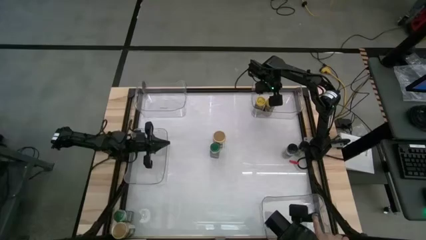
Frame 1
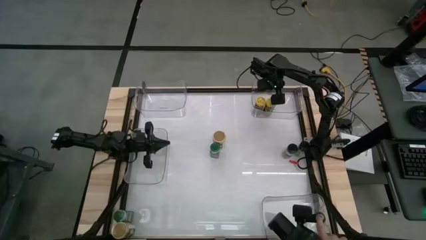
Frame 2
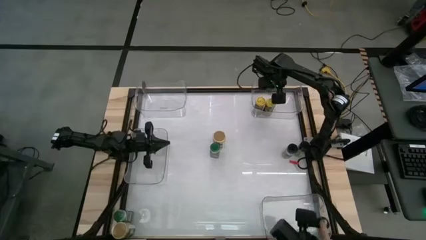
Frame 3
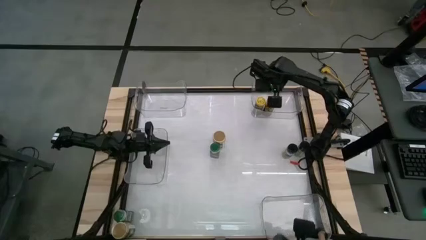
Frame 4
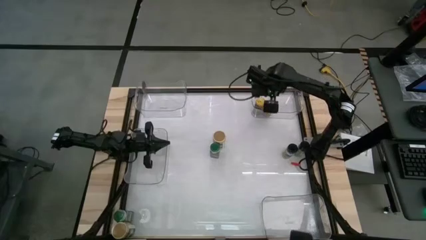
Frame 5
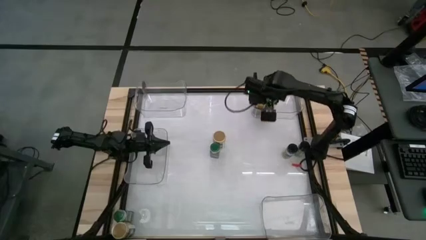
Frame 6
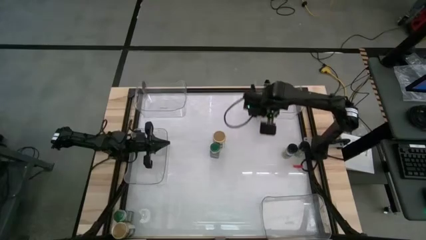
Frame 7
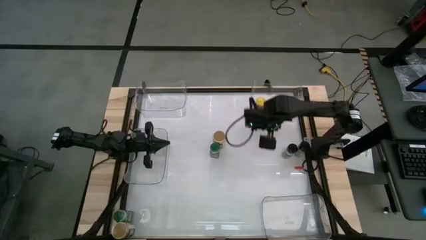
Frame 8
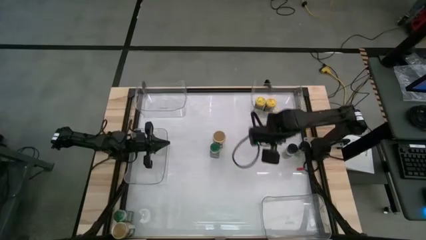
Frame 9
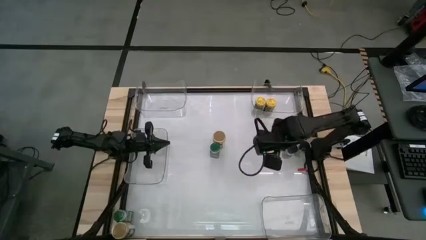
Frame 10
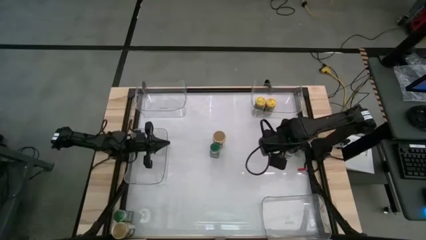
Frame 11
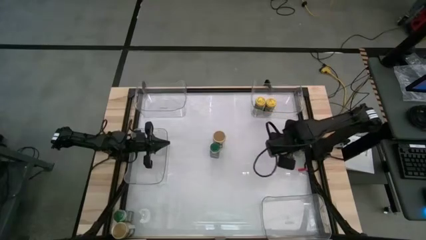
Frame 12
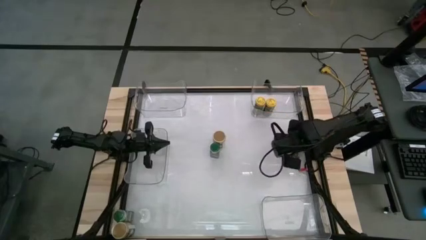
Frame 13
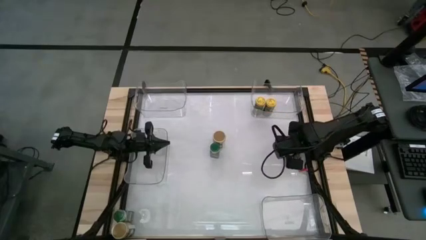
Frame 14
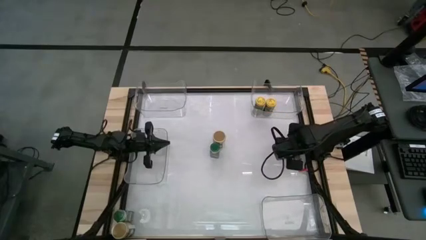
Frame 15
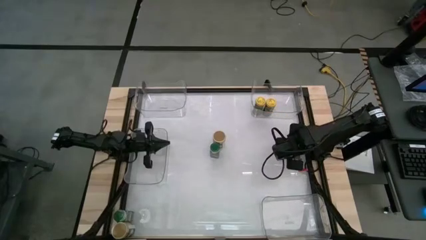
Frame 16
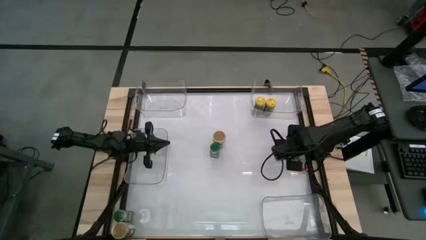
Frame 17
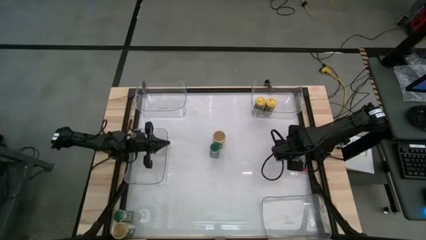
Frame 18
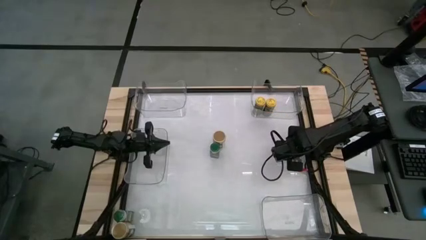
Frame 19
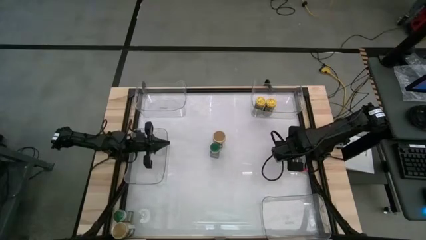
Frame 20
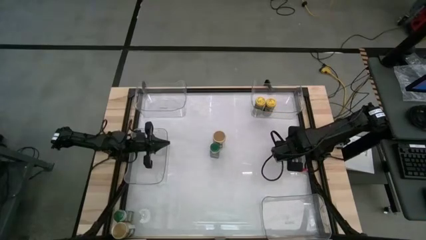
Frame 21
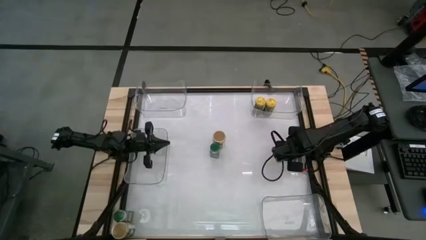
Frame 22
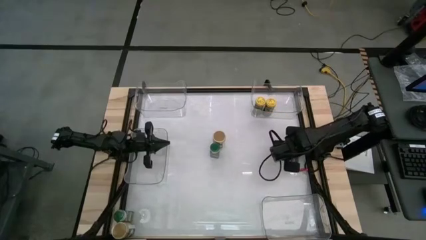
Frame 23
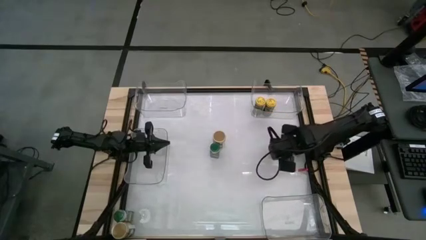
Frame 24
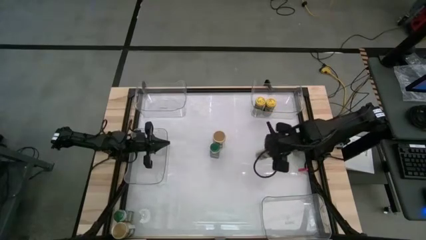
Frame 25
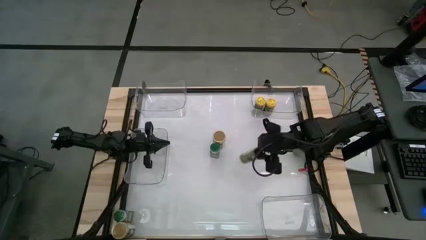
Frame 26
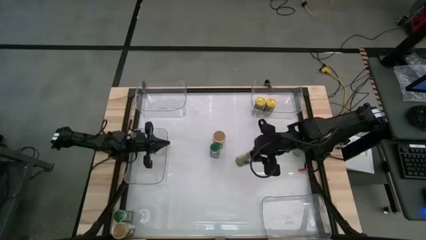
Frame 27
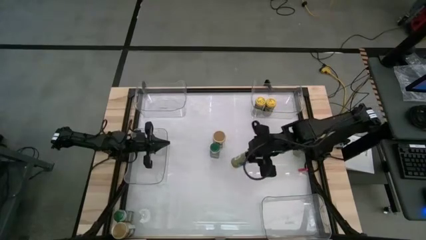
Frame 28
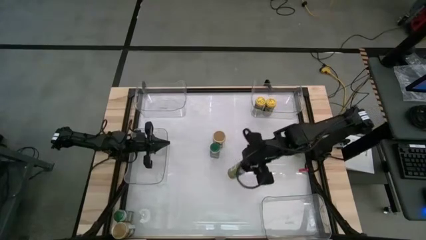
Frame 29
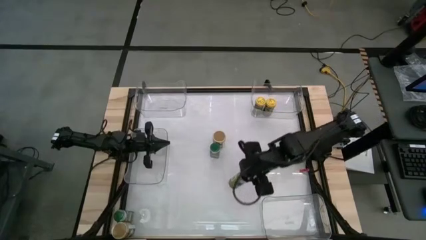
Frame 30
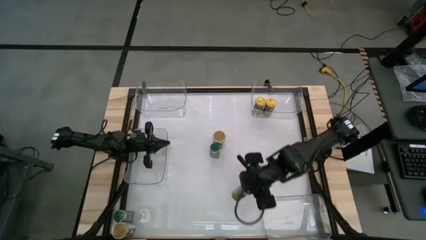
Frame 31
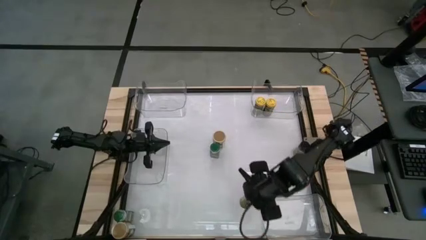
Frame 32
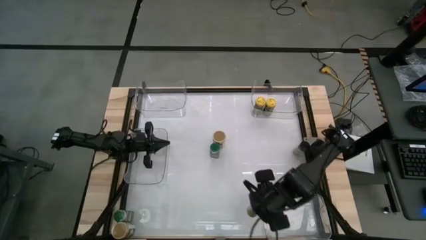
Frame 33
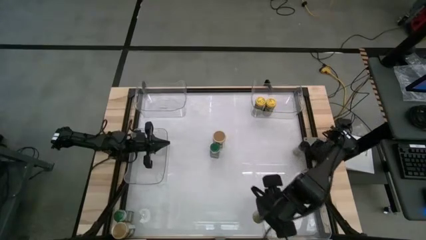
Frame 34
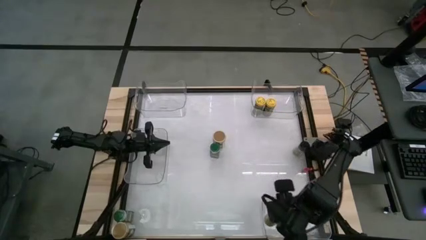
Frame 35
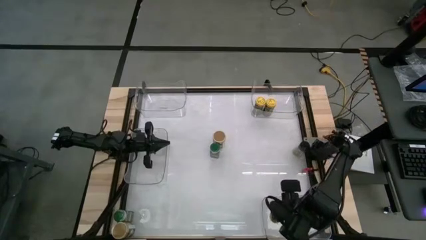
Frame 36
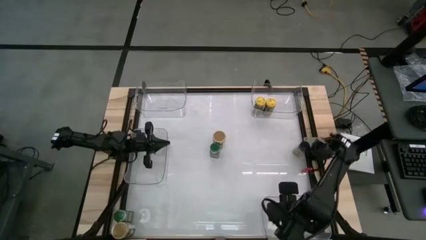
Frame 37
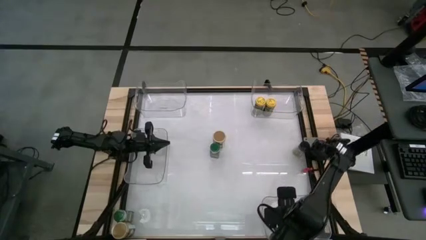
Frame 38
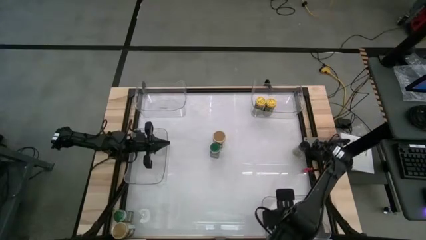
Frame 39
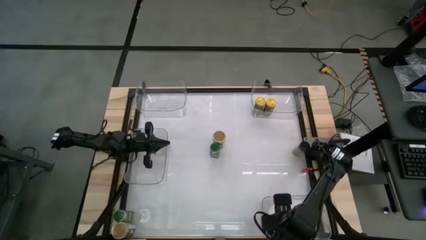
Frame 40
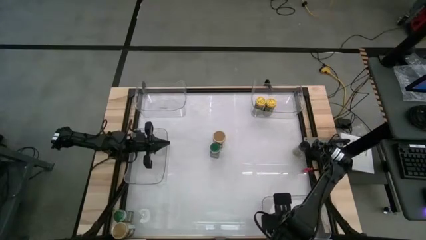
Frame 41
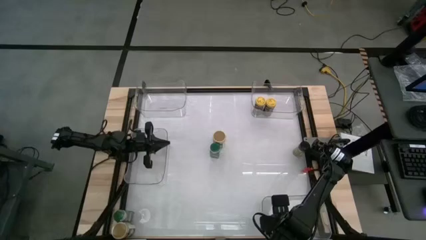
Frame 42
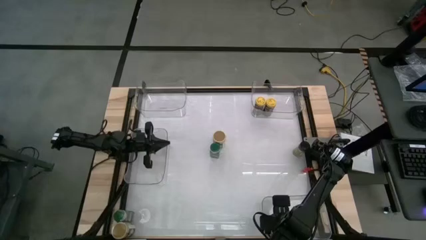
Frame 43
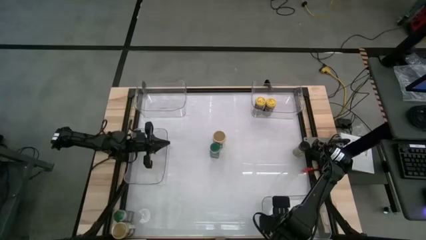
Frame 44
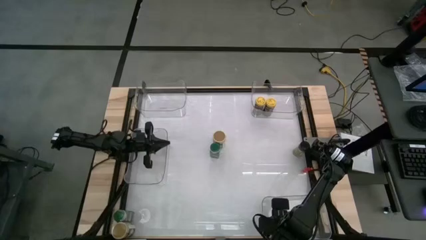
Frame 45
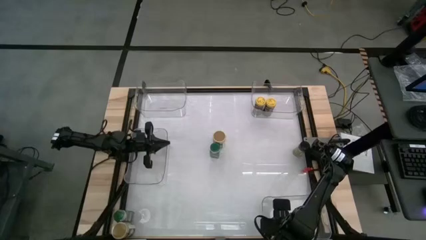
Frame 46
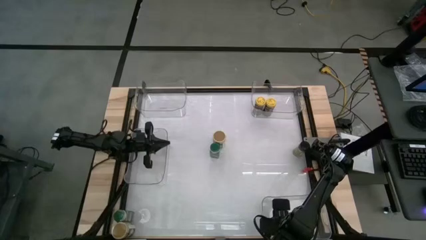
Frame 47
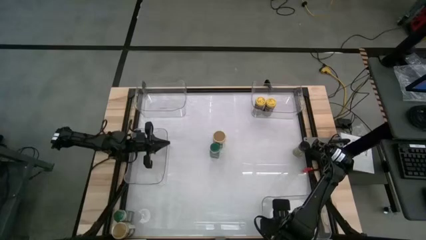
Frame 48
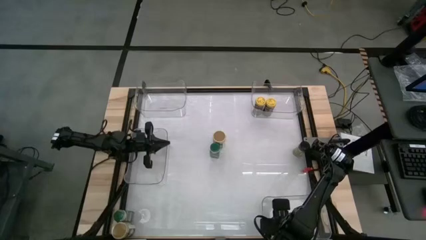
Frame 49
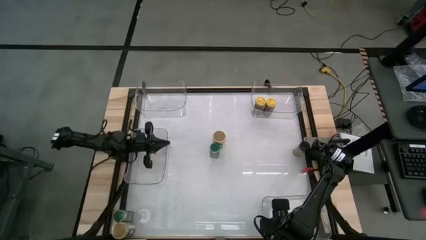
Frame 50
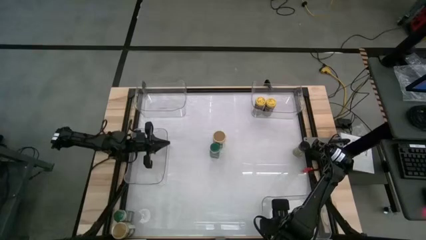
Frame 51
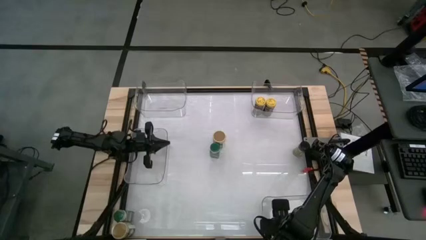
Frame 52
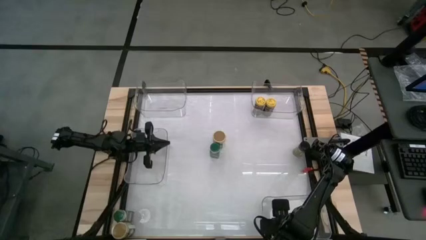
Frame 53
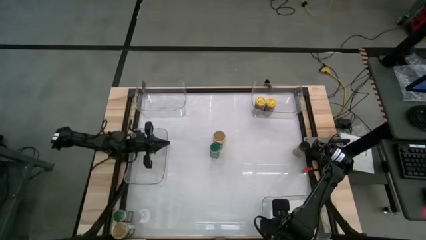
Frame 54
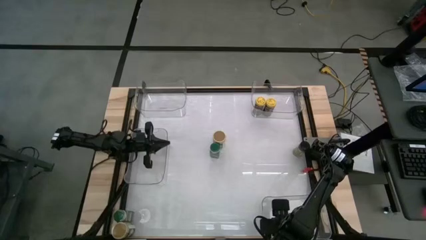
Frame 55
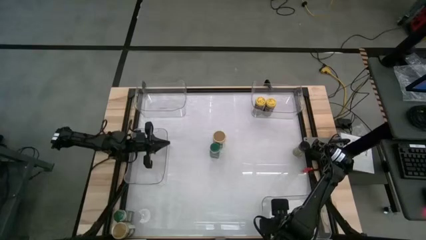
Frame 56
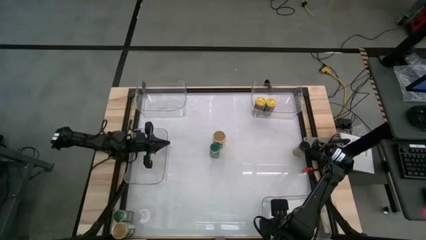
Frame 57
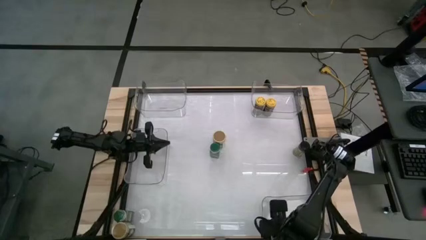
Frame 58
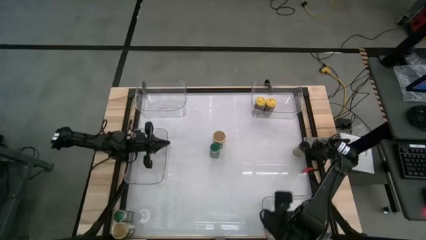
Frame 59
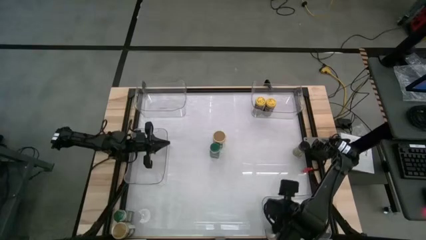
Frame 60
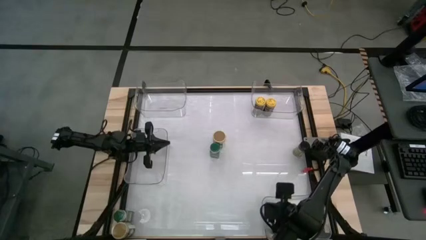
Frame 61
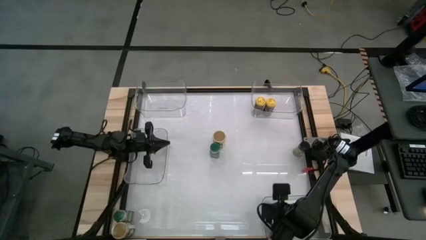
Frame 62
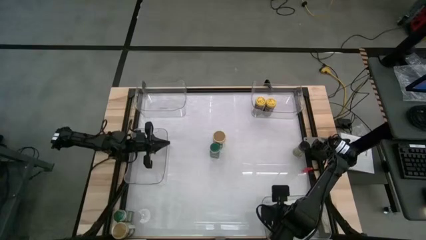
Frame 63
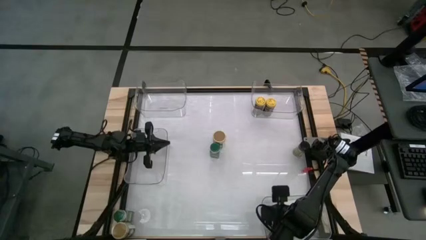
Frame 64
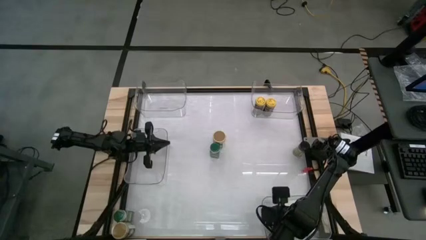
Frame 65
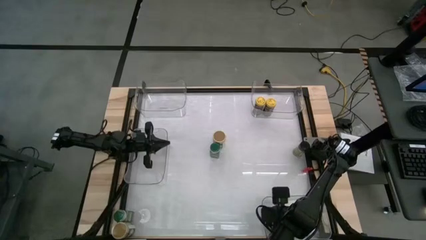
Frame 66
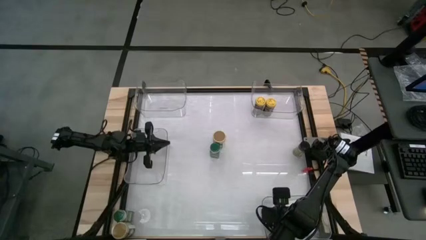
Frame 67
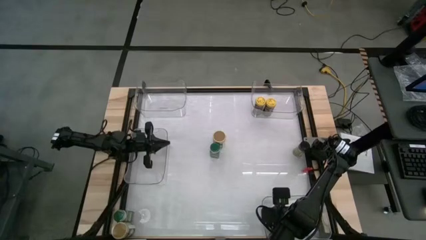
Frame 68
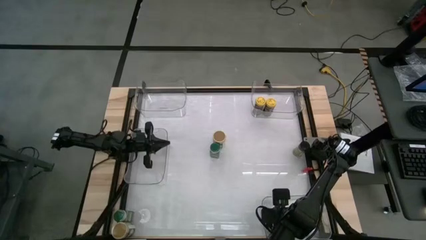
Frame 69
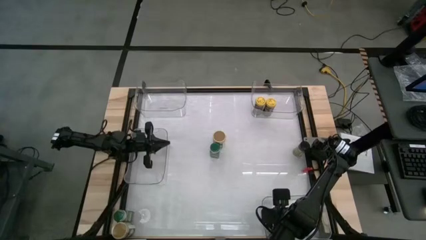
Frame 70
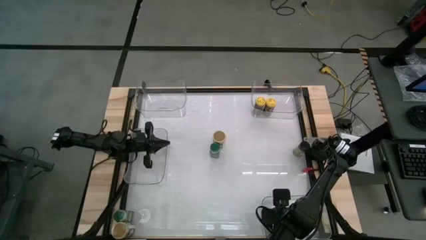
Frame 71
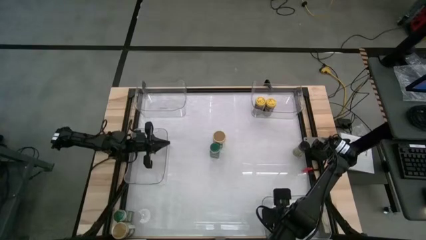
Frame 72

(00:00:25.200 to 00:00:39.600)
Task: Sort spices by type
Put the left black seasoning bottle into the bottom right transparent bin
